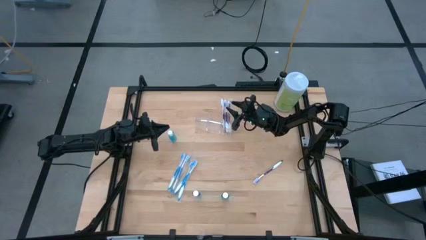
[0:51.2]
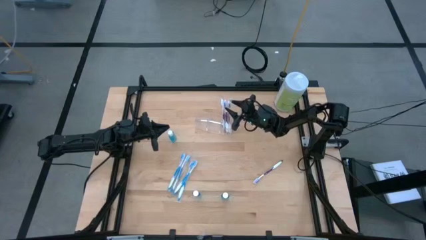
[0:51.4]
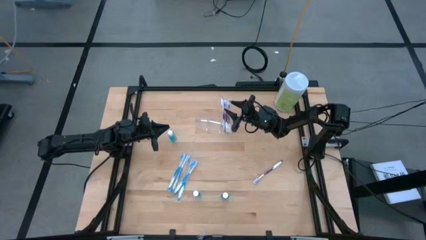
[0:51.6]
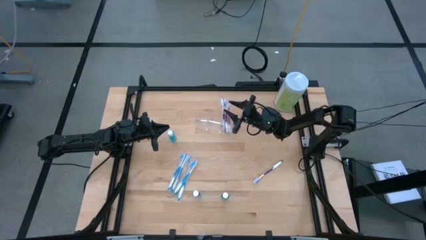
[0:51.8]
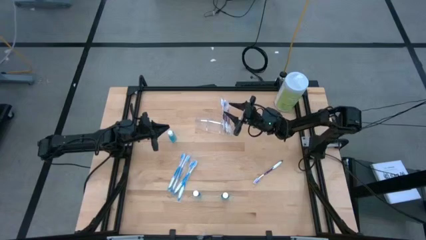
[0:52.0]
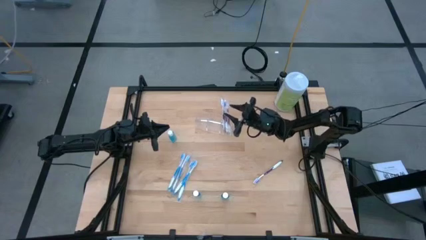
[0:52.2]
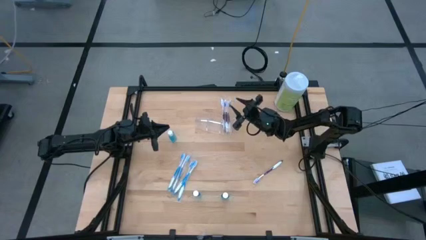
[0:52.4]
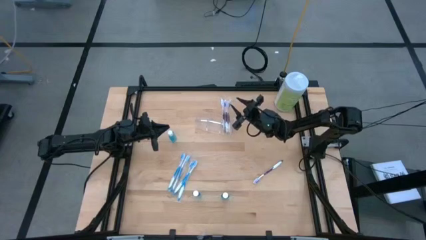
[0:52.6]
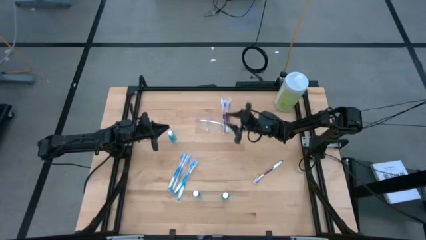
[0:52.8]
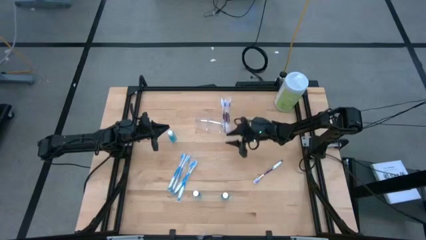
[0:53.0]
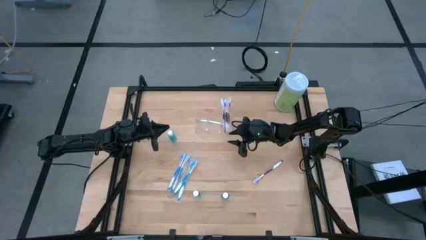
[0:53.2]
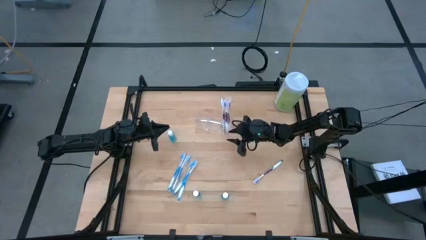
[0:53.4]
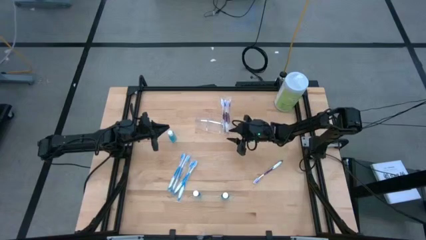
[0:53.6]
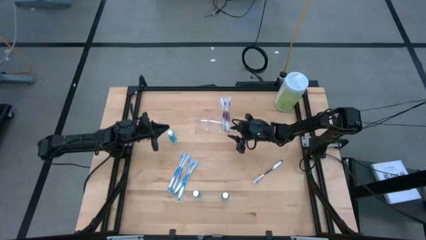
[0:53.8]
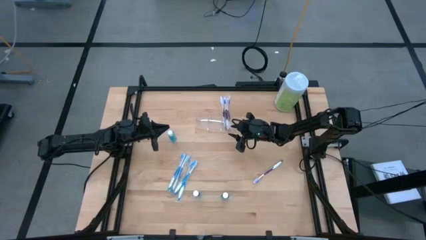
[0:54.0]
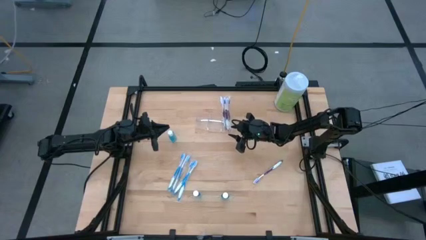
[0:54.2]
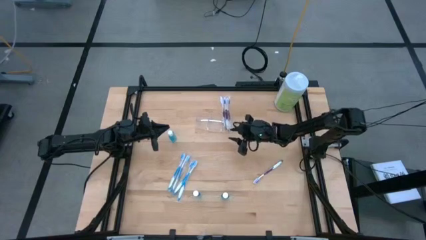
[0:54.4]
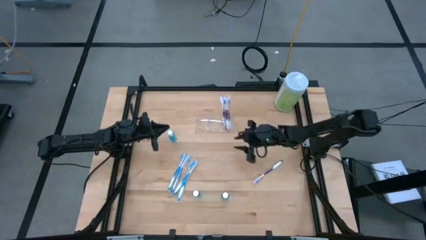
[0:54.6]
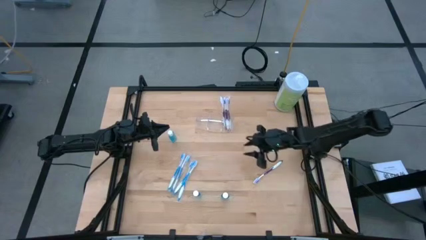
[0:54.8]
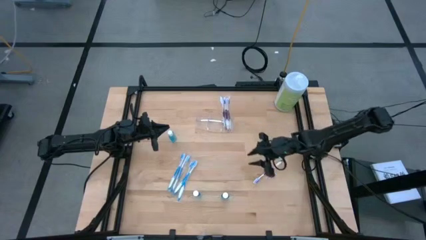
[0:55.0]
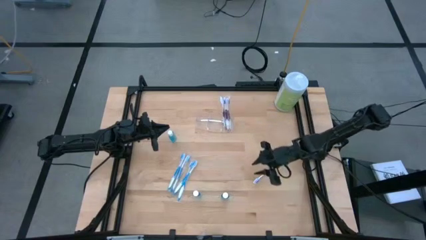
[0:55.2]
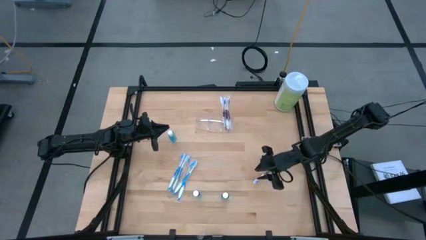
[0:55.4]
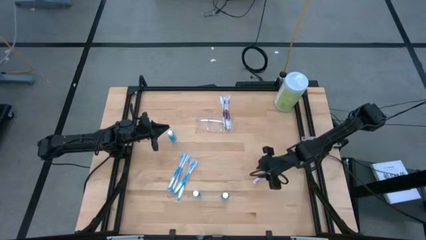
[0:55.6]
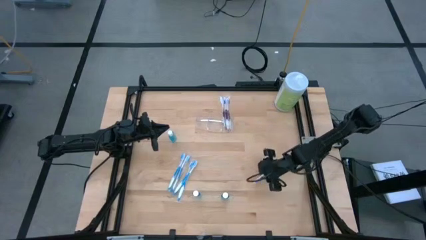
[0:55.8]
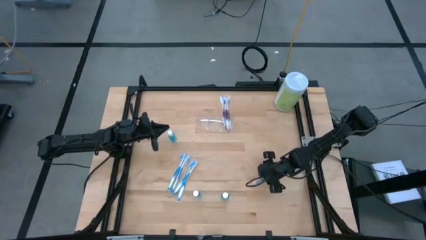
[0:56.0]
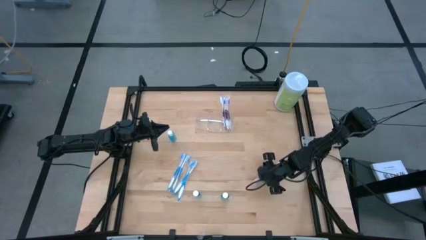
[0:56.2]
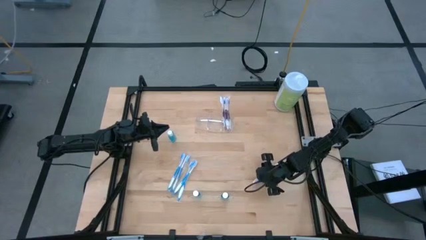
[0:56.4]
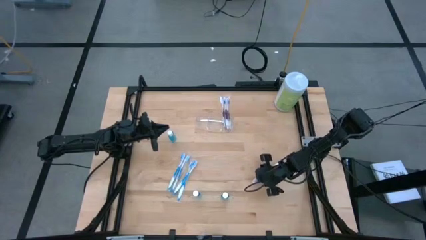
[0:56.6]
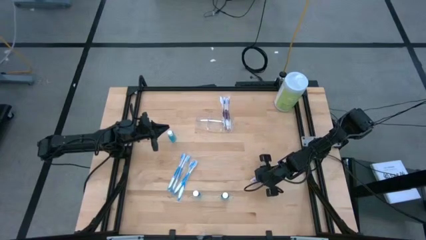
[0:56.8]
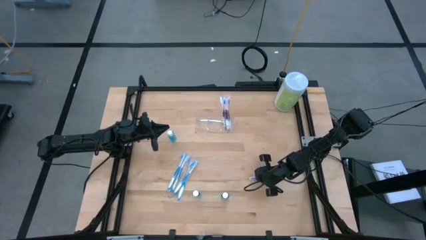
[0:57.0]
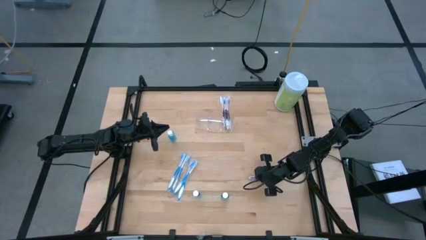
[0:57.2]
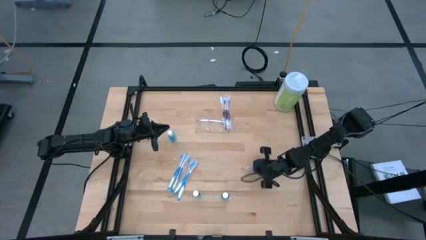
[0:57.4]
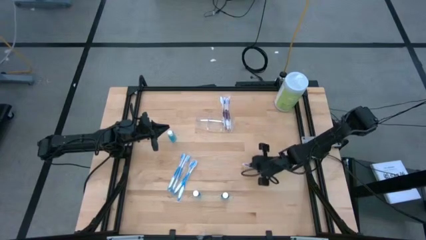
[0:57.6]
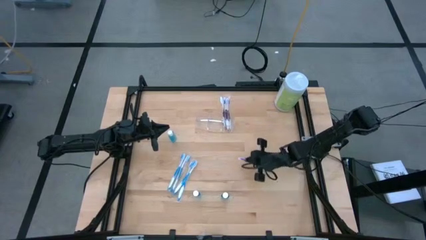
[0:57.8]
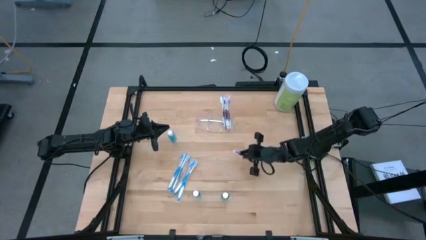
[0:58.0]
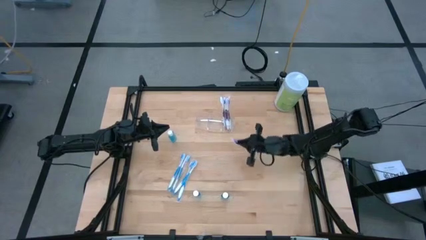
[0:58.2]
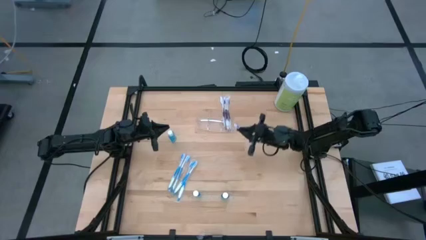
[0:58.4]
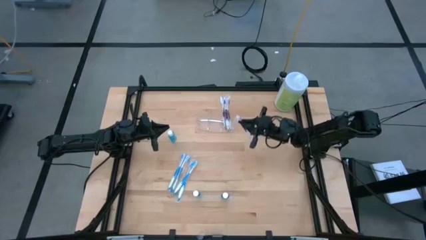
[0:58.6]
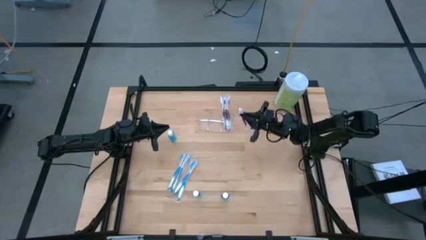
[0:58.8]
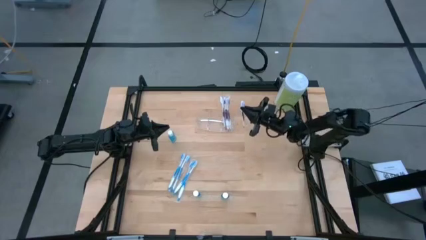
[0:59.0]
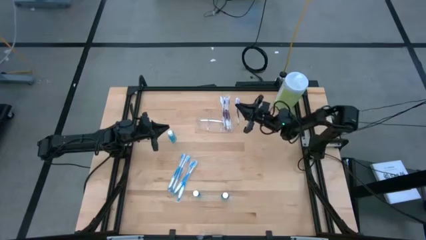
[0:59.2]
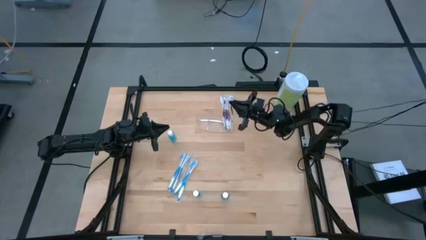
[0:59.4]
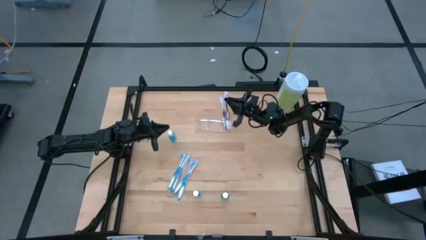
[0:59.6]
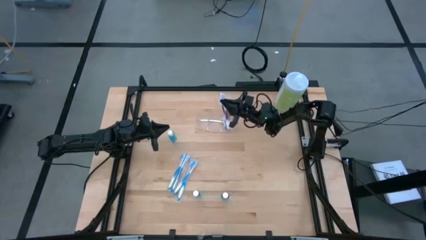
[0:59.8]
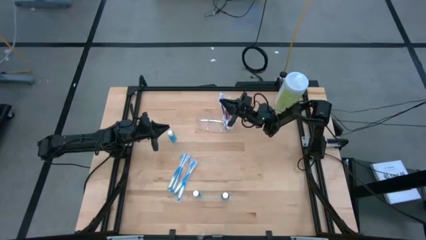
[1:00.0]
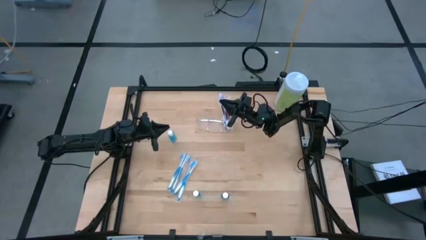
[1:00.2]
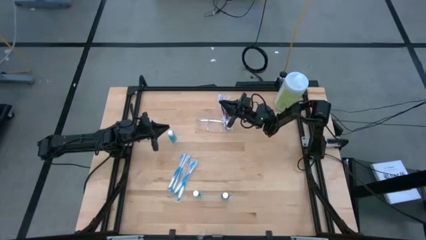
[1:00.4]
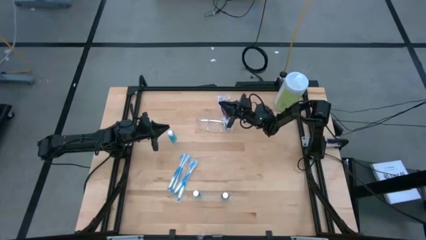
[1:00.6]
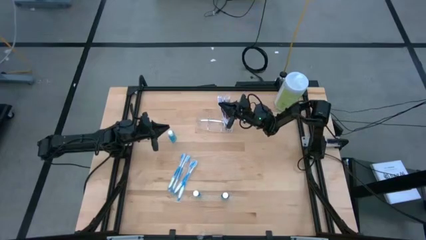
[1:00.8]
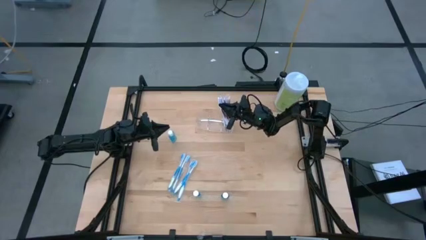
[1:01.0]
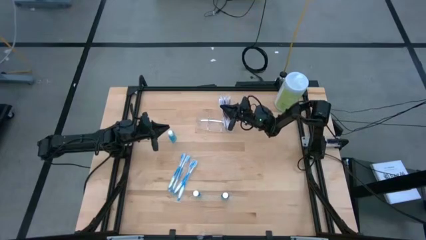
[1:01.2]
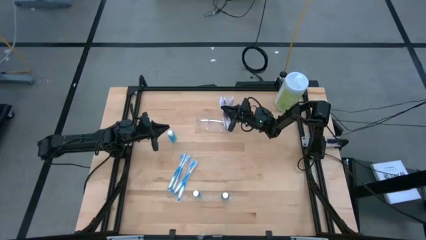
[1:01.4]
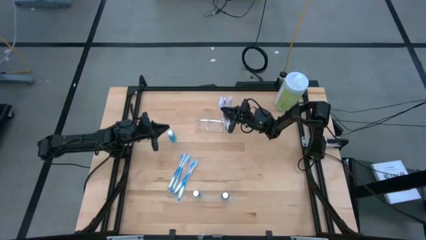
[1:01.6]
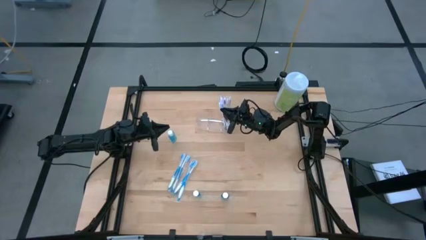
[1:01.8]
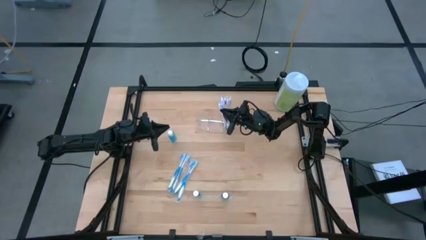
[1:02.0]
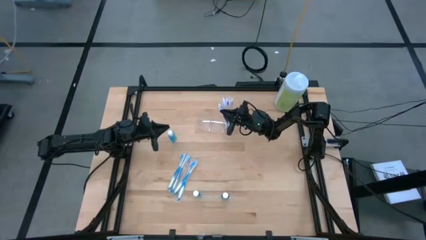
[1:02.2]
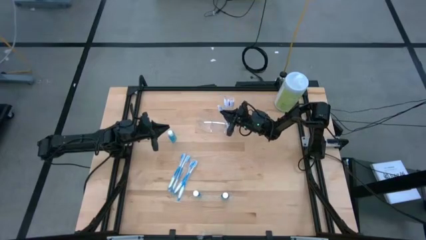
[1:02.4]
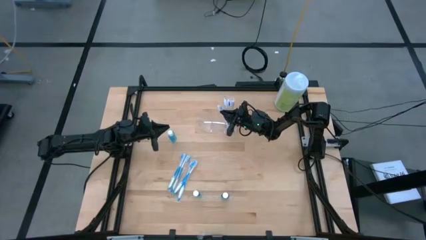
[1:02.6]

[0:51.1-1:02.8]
Task: Pick & Place toothbrushing station
Put the violet toothbrush into the transparent organizer

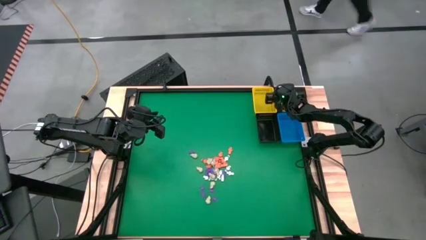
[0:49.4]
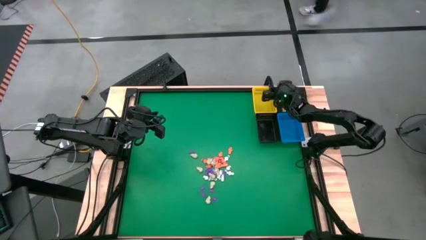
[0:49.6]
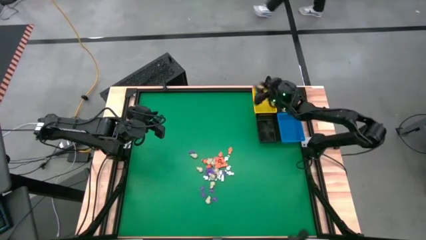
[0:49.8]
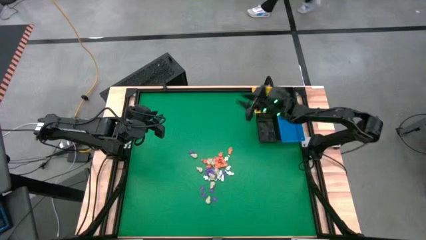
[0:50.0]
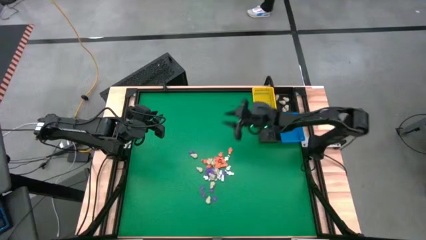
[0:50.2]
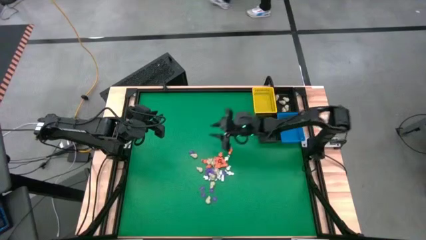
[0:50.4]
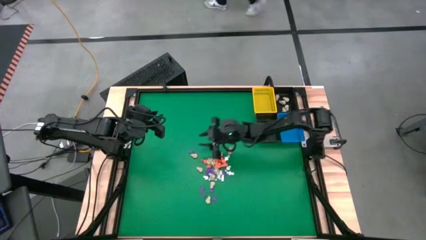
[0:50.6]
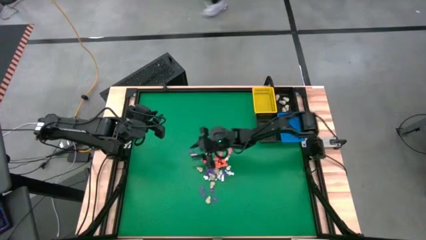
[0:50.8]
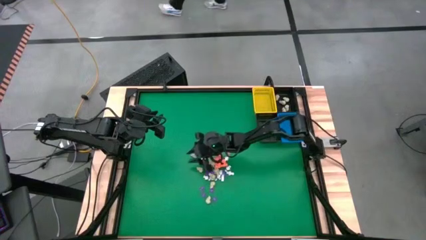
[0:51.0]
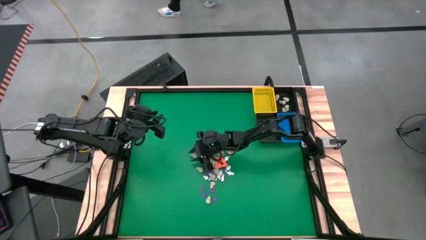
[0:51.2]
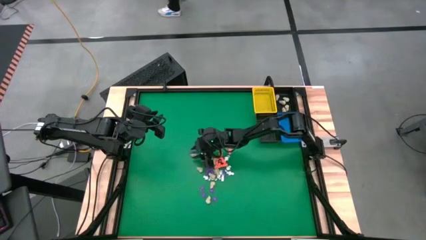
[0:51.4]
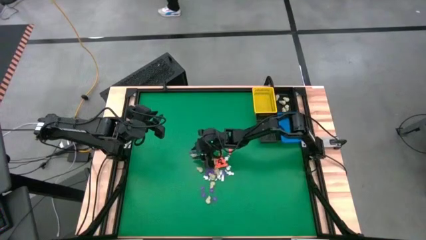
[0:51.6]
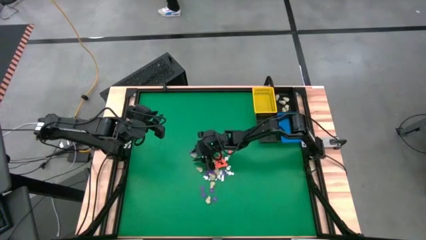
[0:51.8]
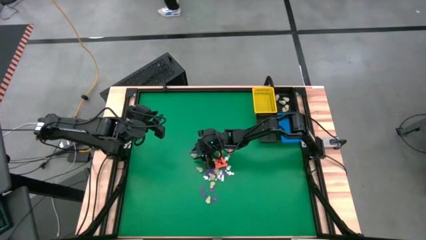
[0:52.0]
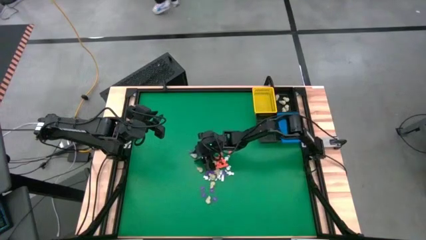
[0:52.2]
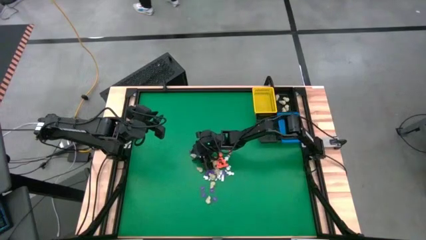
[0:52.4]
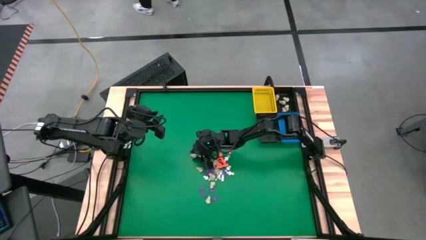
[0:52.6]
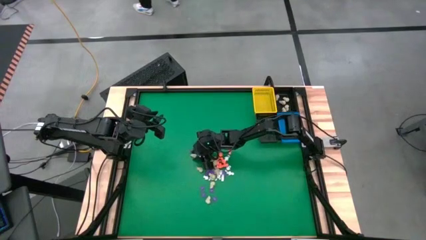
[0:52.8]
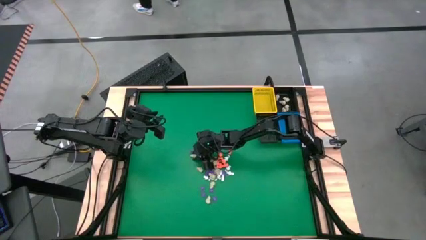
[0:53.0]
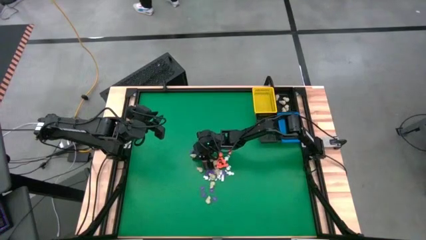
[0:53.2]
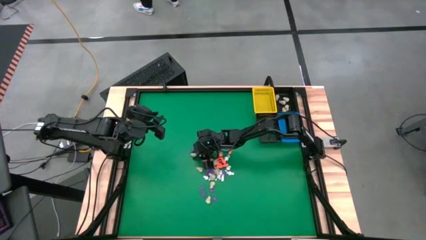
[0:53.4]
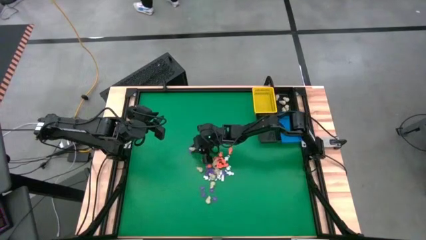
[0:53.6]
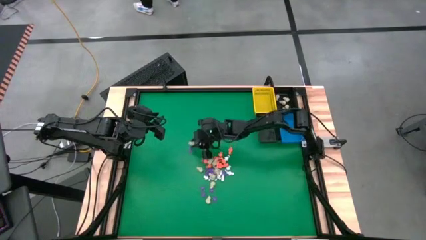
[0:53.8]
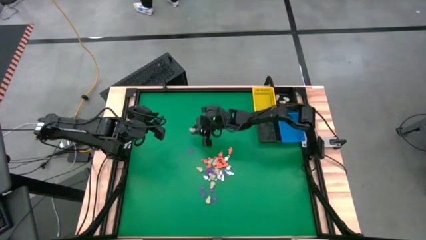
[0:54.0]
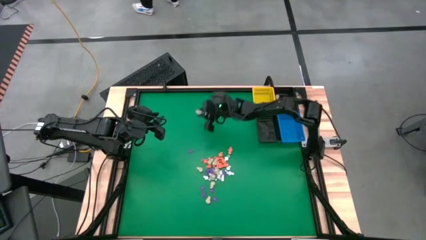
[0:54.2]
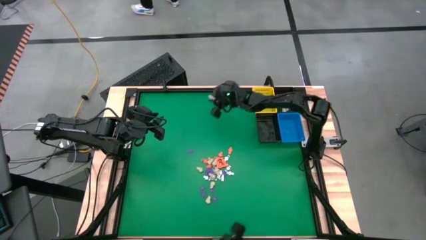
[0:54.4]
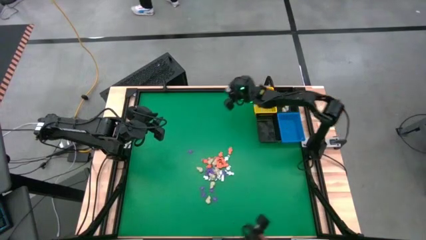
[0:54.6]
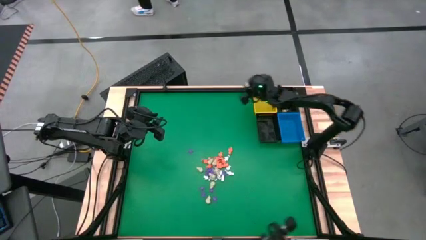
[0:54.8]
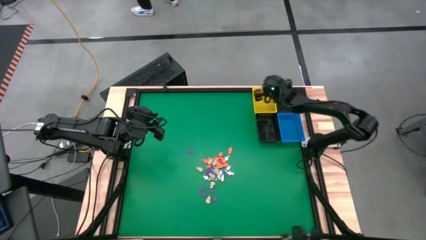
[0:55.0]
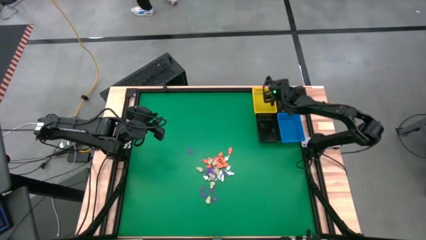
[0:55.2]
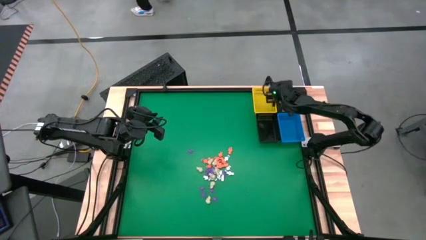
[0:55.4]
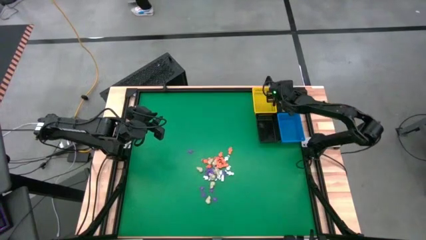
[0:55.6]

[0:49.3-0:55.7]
Task: Sort Halloween decoration
Put the gray skull toy into the top black basket
